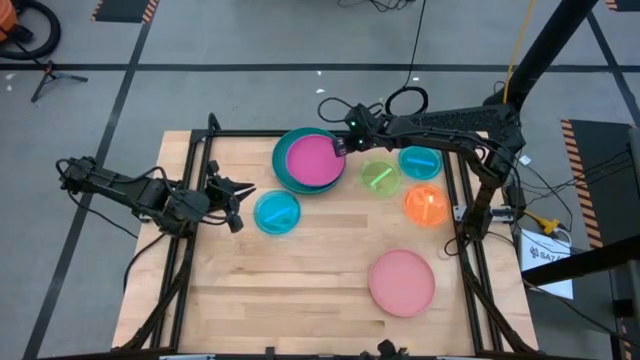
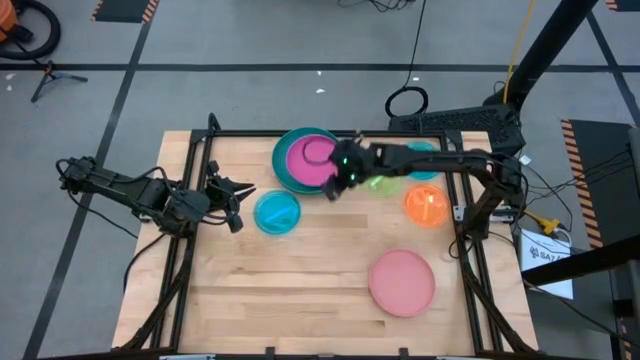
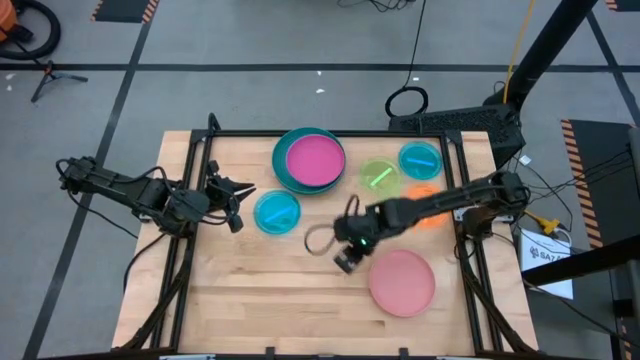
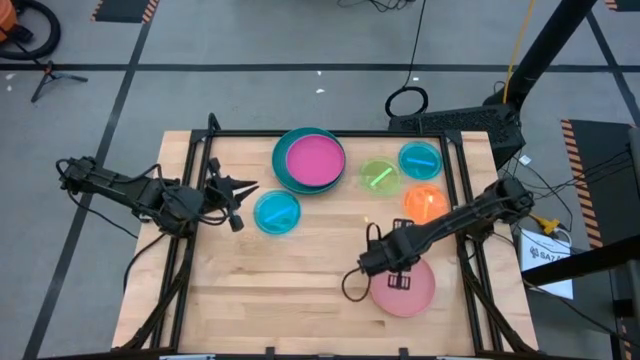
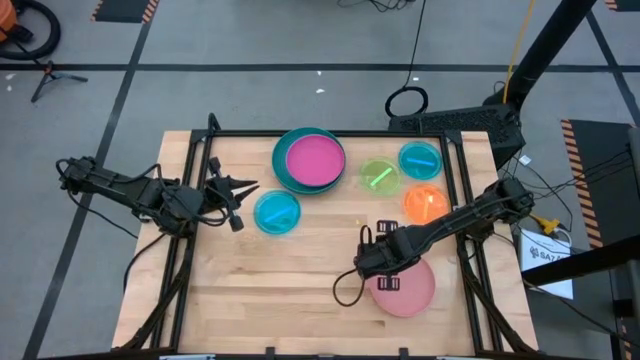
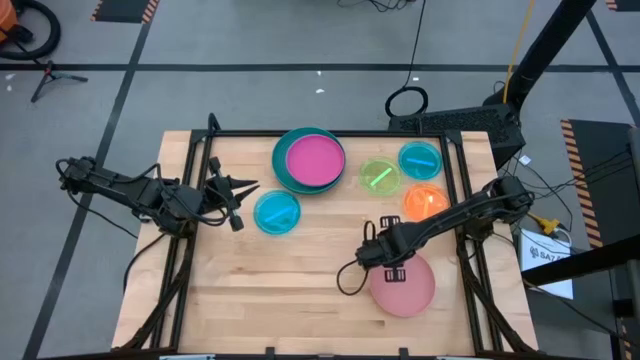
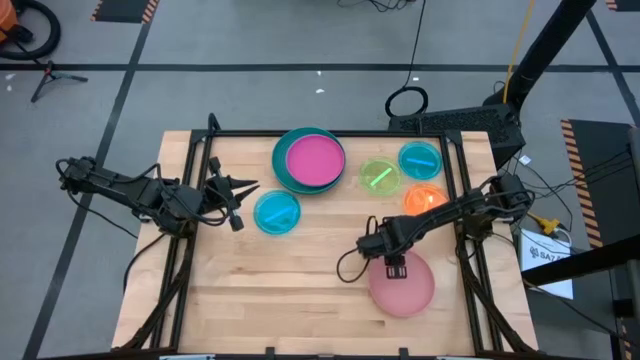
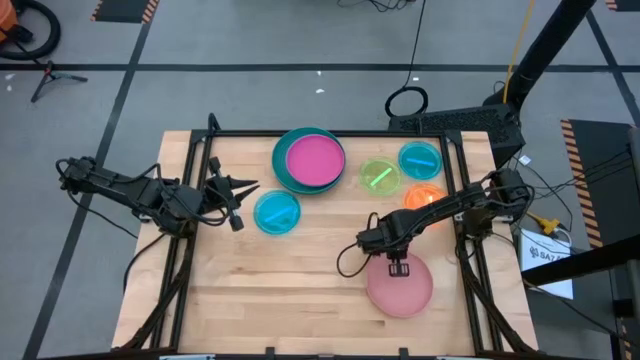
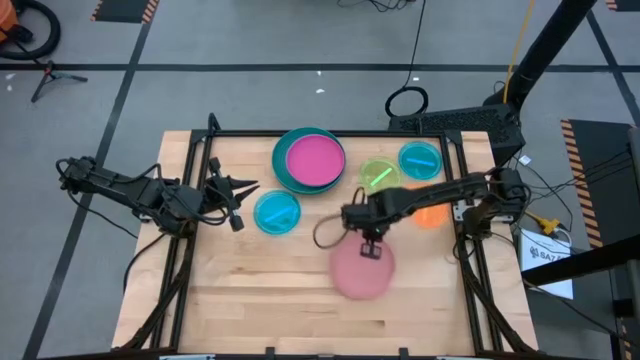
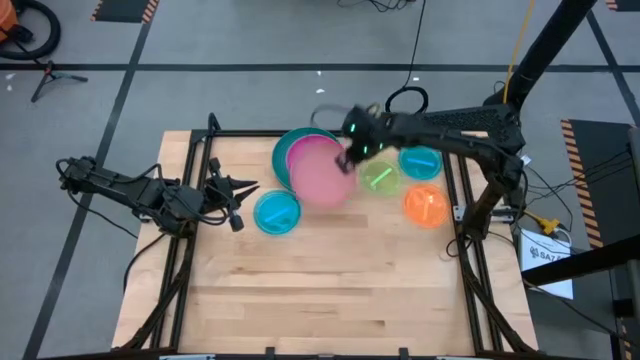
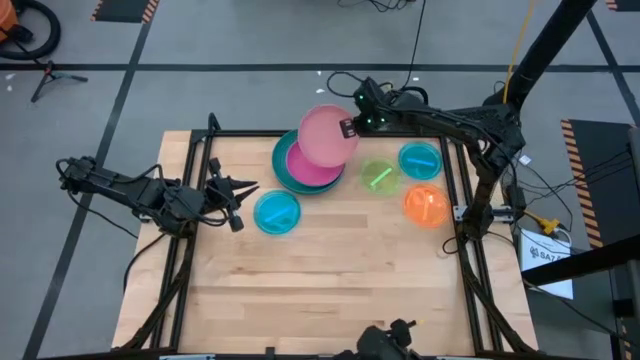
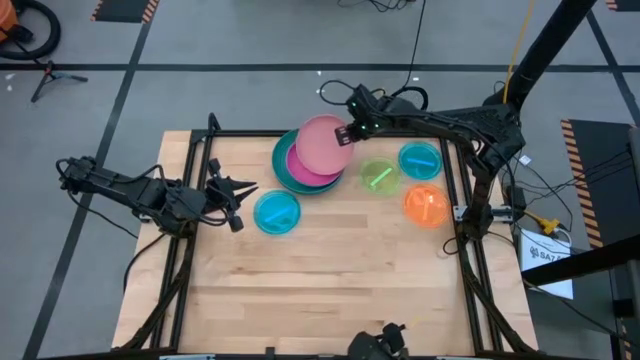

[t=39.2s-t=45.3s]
Task: Stack plastic plates
Stack the light pink plate on top of the dark pink plate

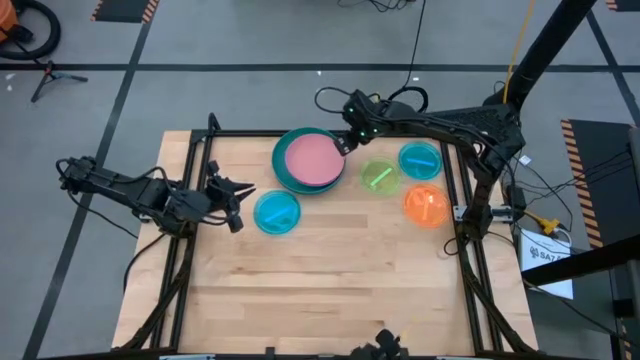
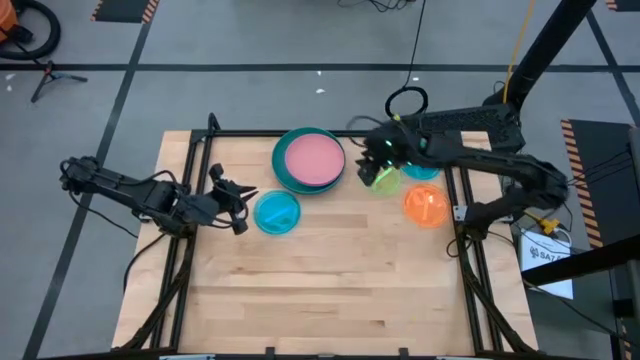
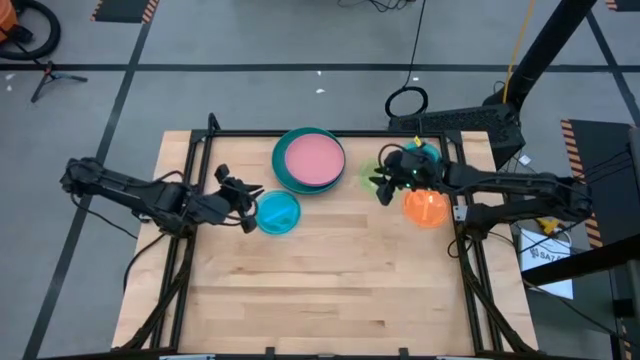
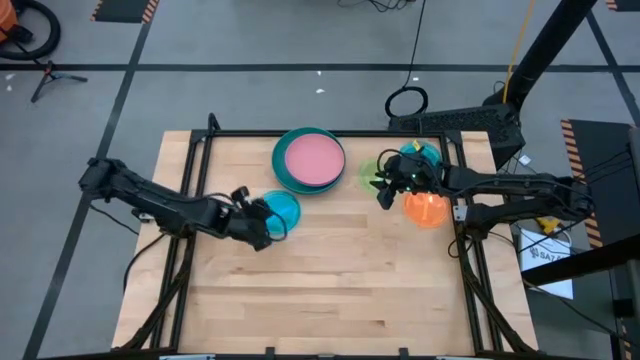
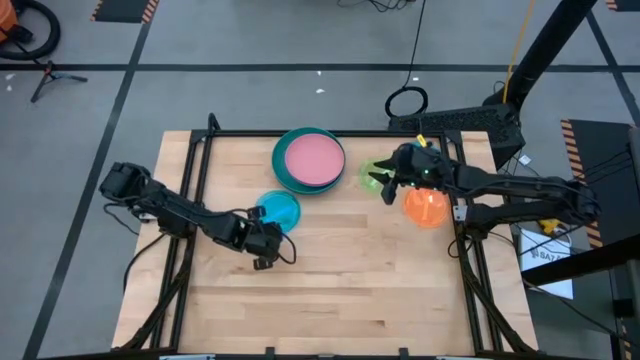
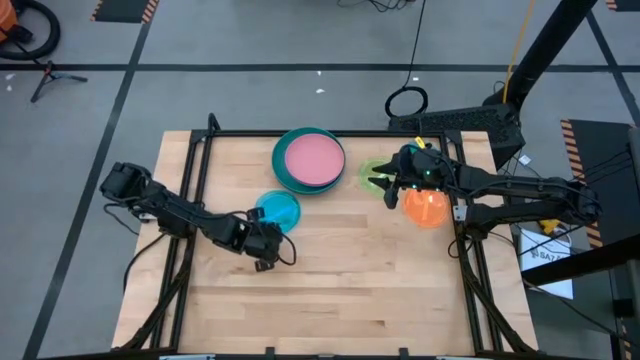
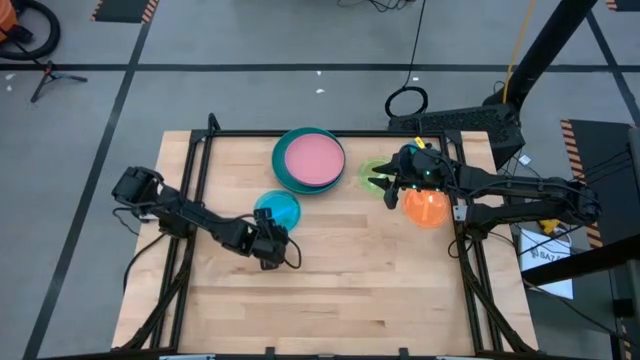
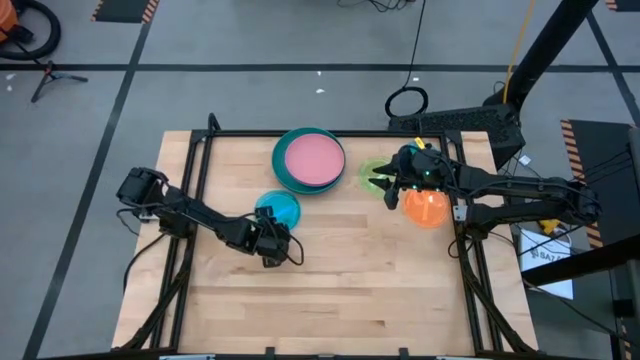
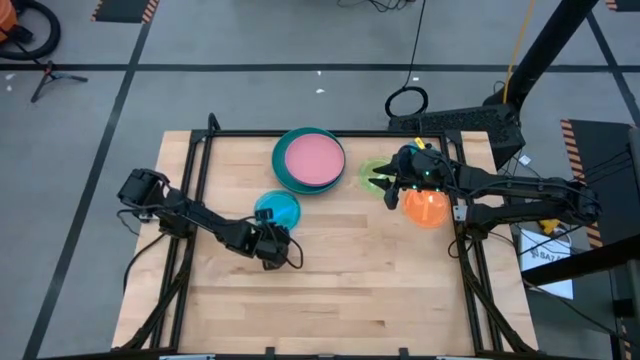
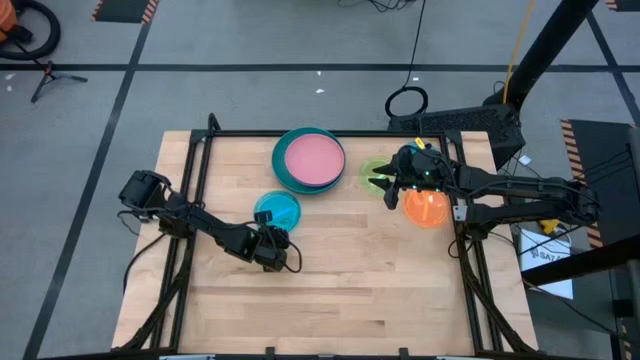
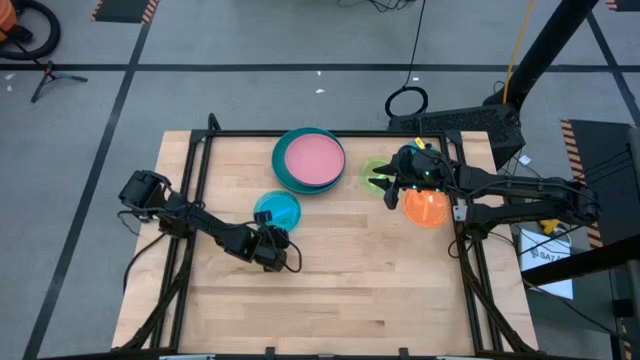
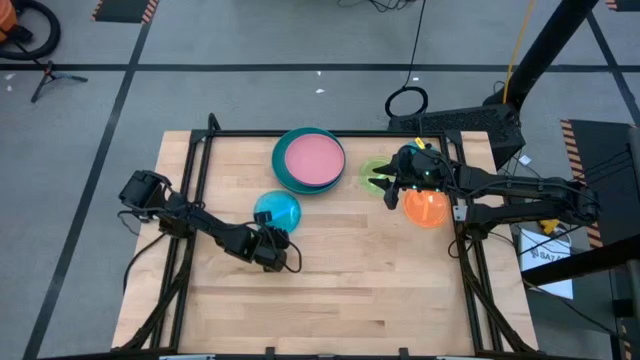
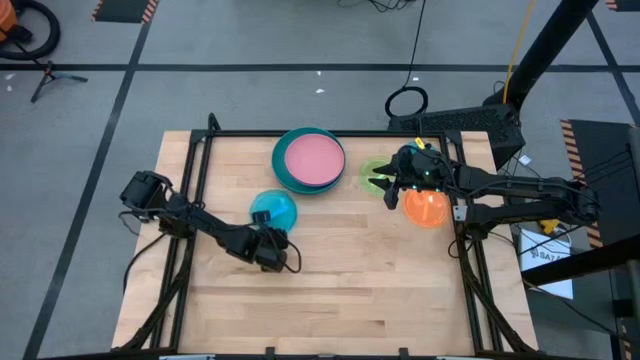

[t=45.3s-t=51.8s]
Stack the bottom light blue plate on top of the light pink plate

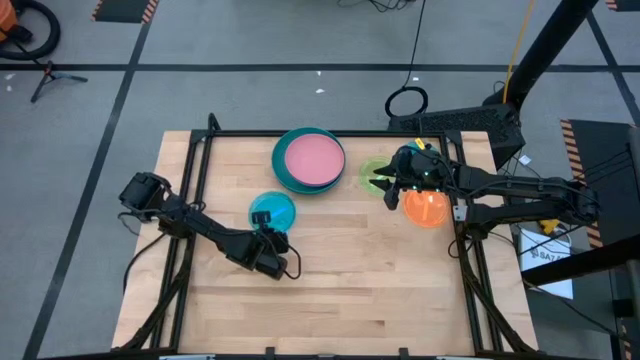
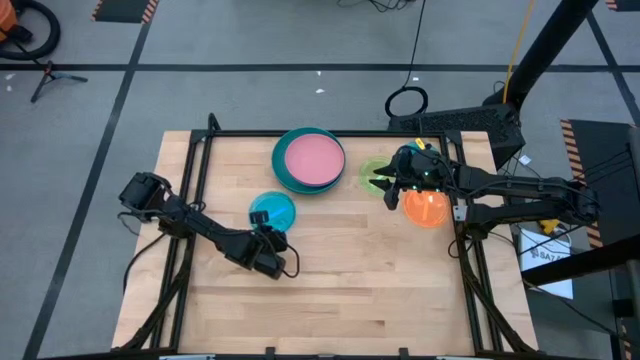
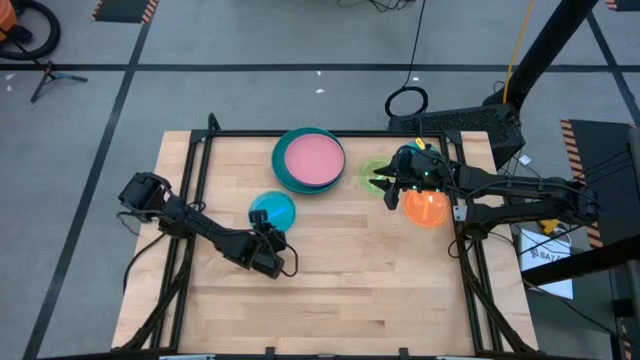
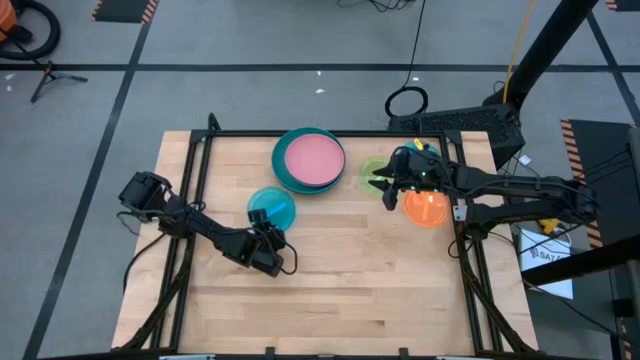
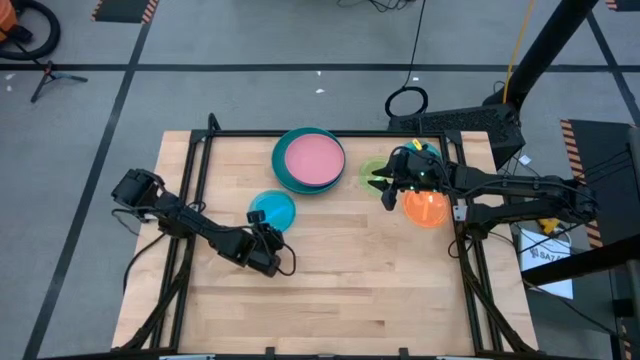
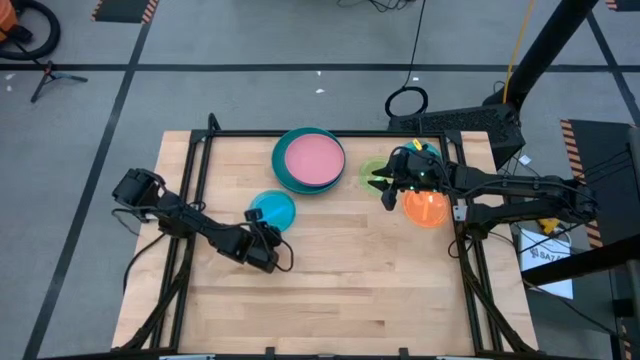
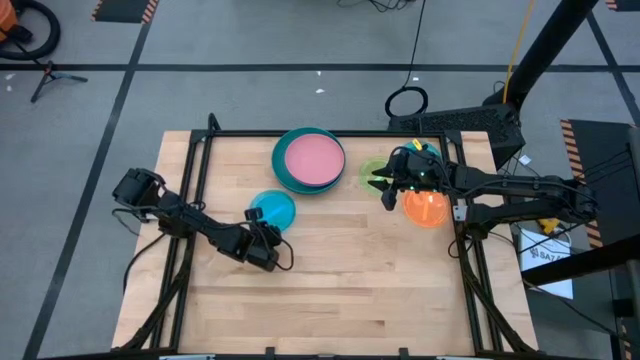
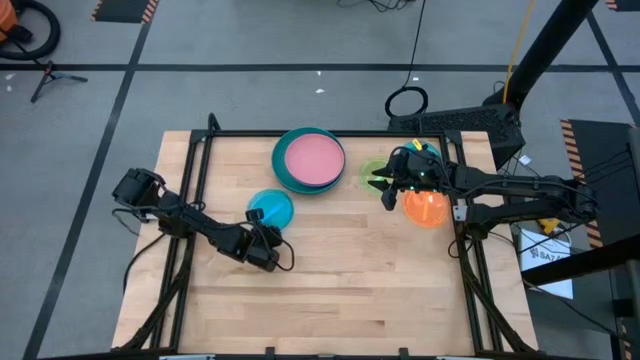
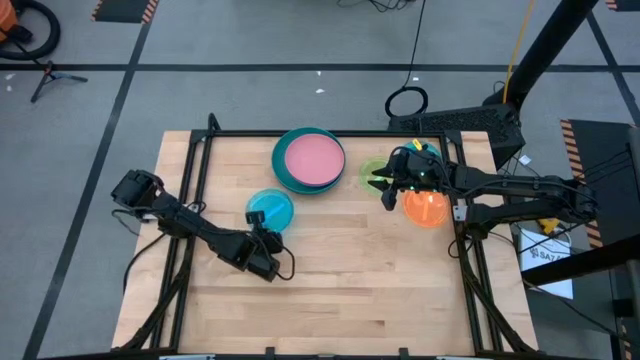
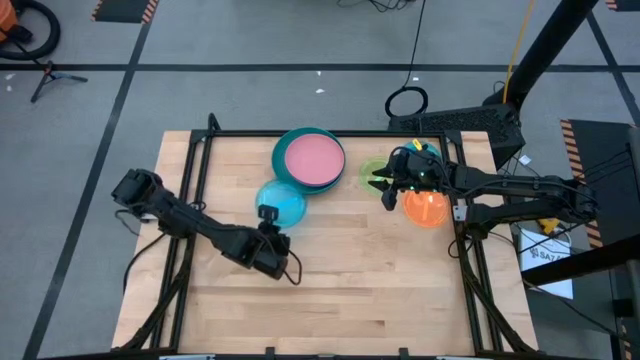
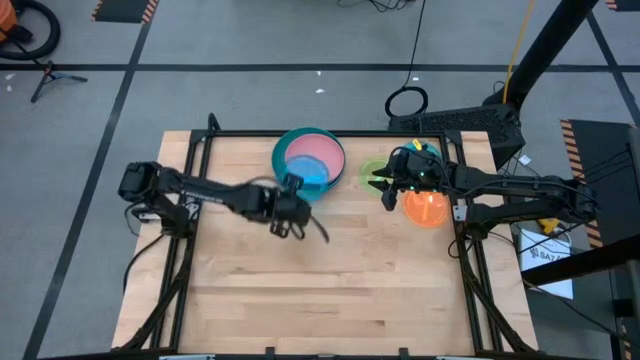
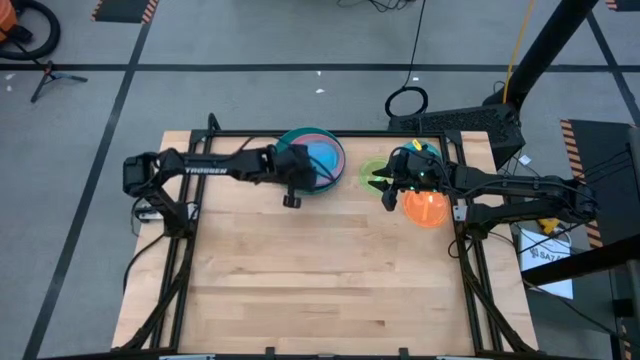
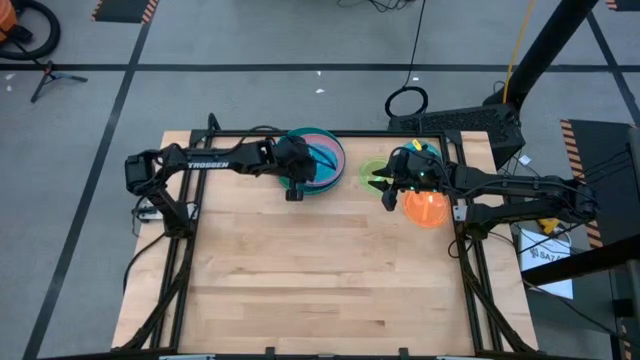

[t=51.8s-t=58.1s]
Stack the bottom light blue plate on top of the light pink plate

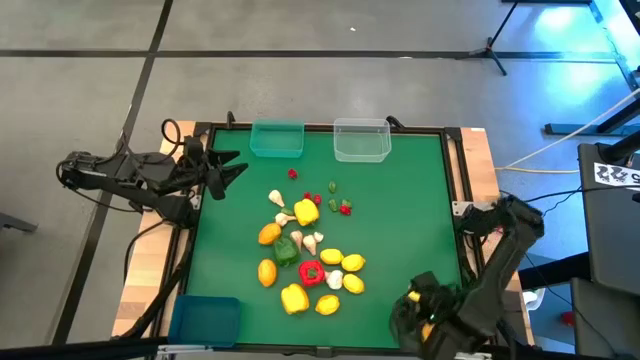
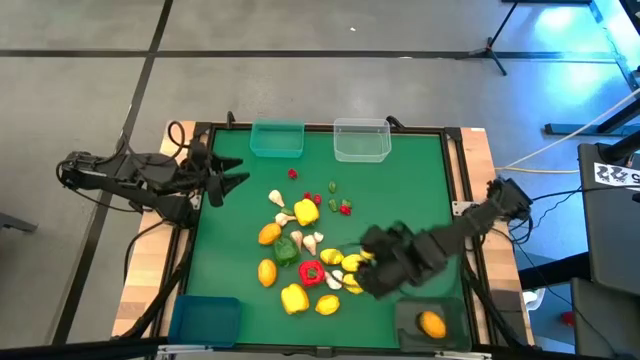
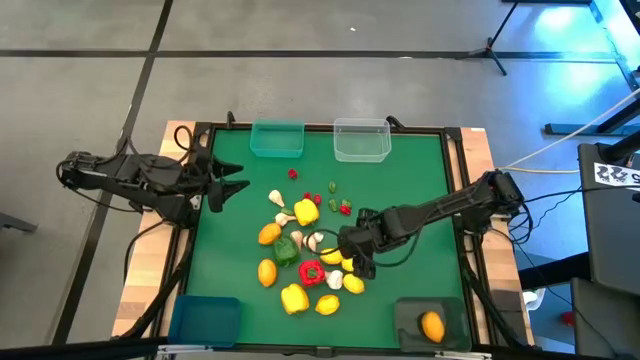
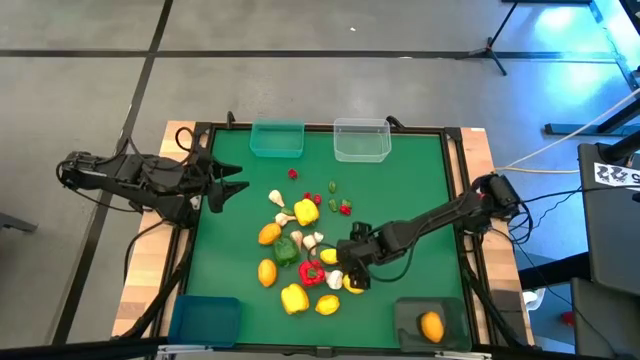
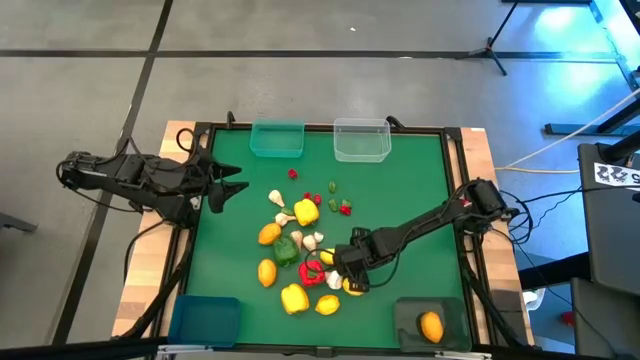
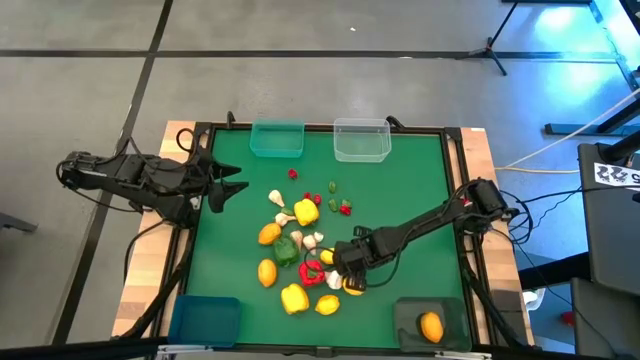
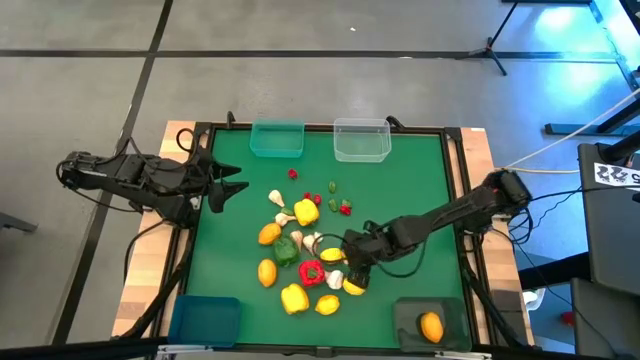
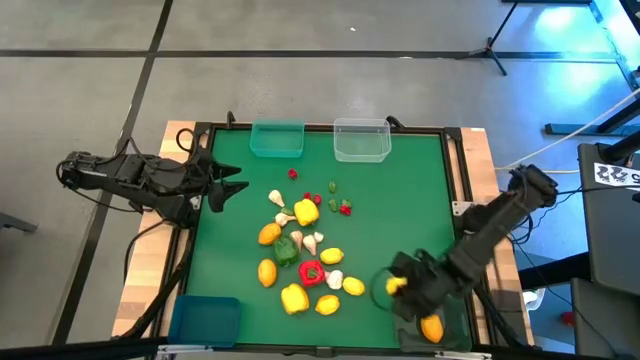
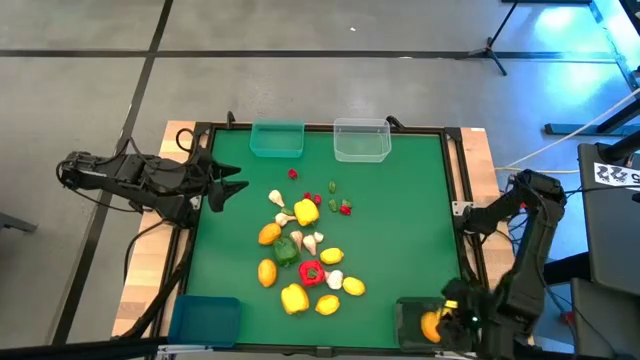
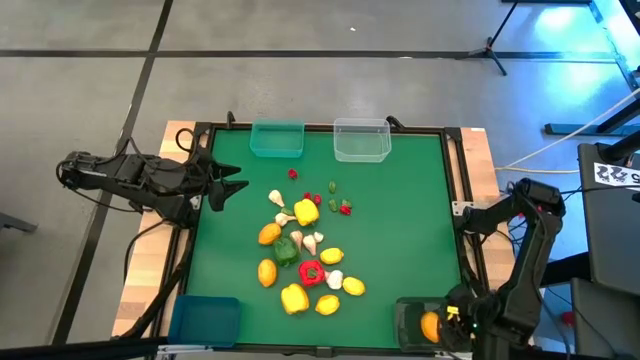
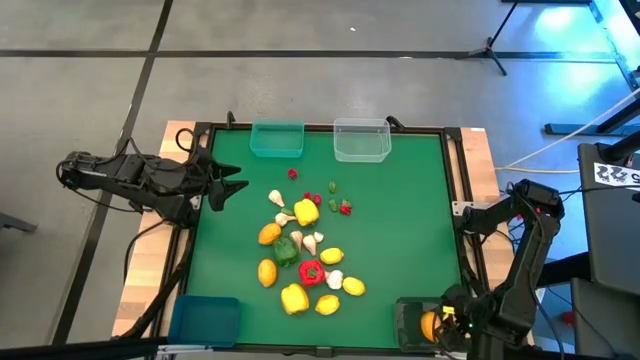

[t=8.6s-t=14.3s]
Task: Sort produce into baskets
Put the lemon into the black bin
